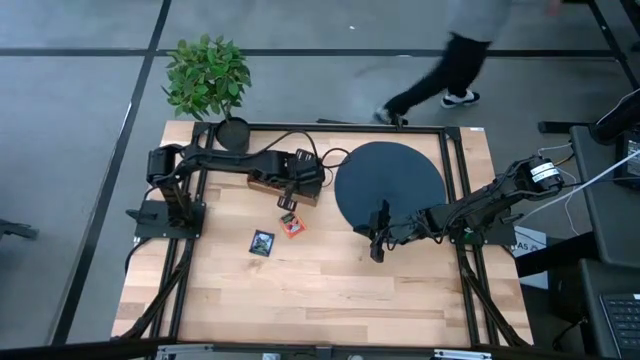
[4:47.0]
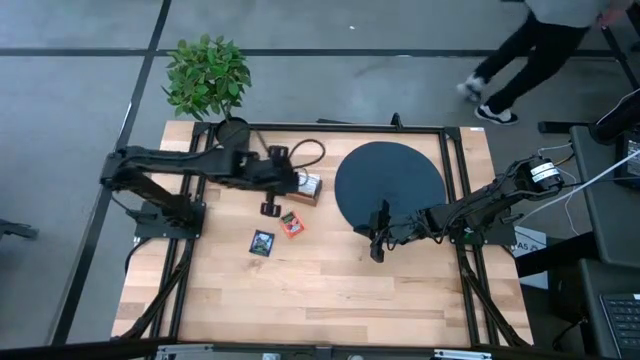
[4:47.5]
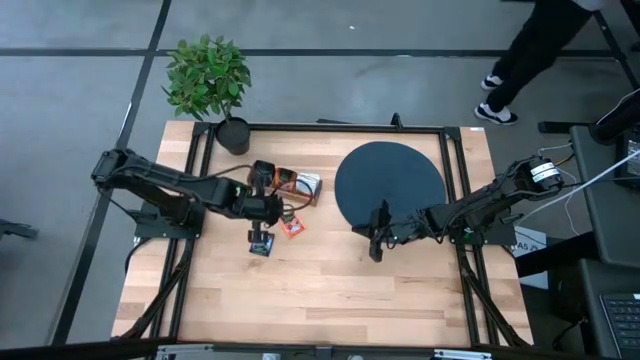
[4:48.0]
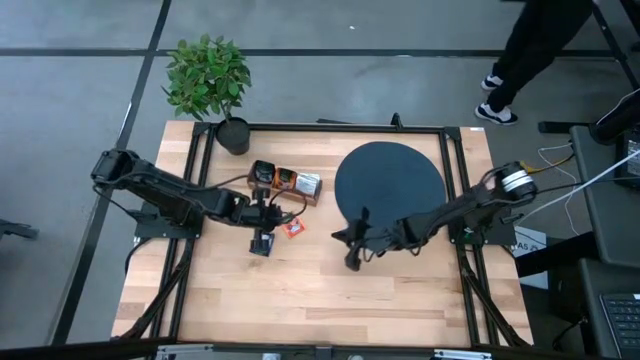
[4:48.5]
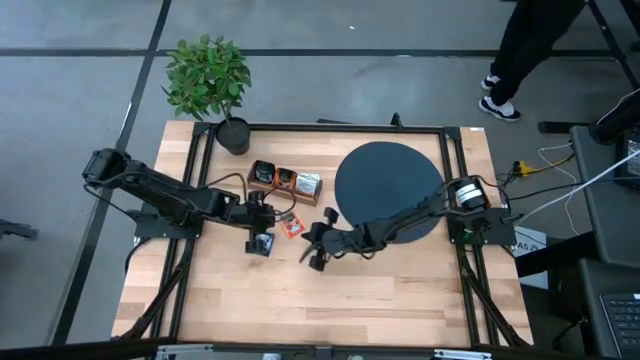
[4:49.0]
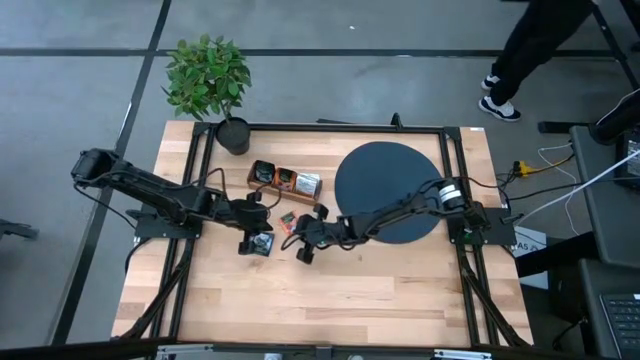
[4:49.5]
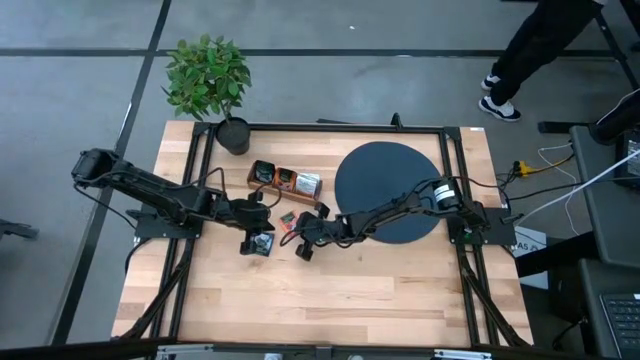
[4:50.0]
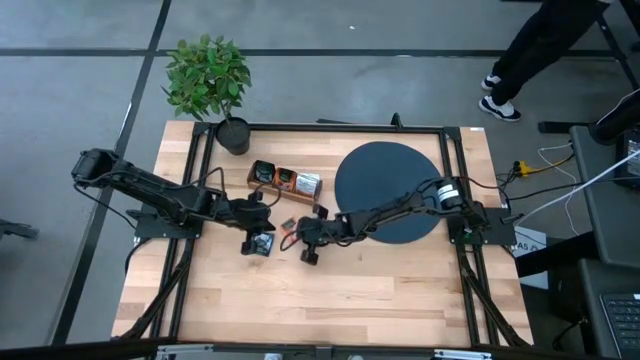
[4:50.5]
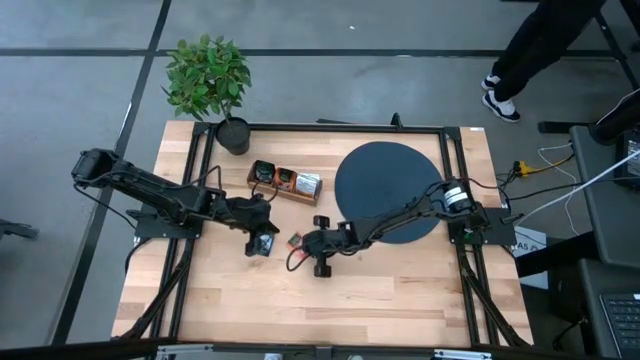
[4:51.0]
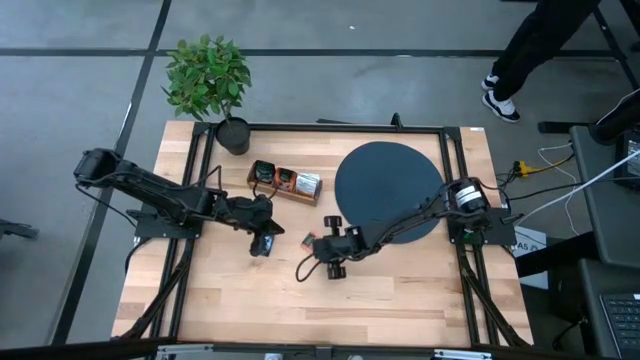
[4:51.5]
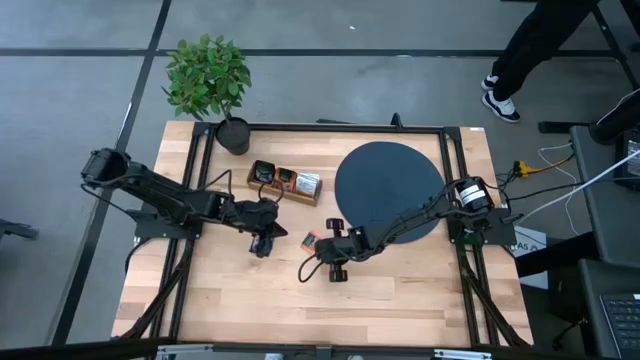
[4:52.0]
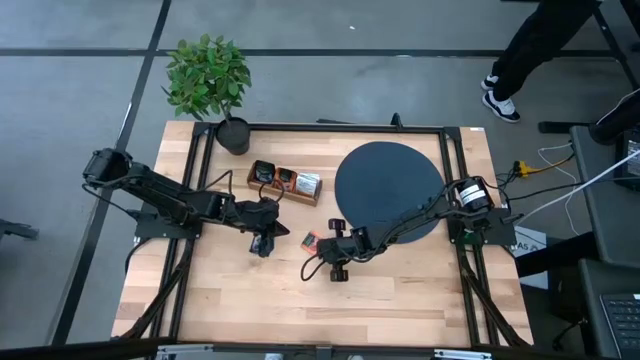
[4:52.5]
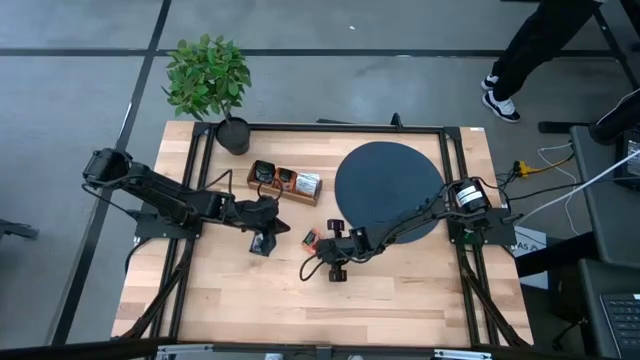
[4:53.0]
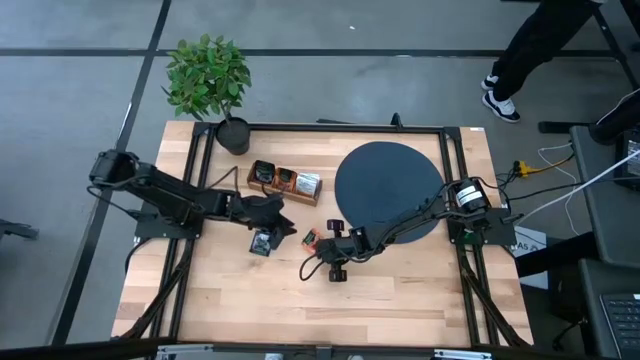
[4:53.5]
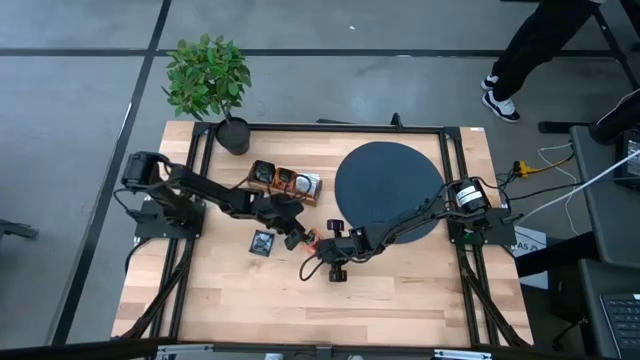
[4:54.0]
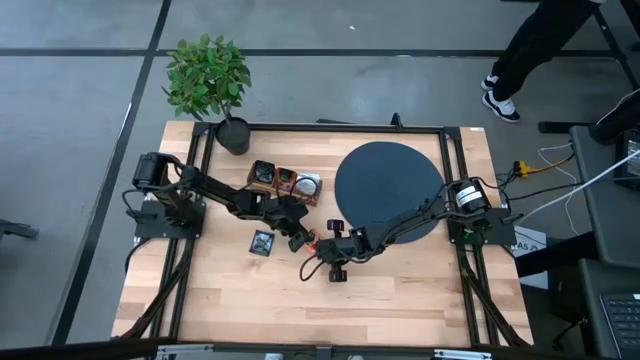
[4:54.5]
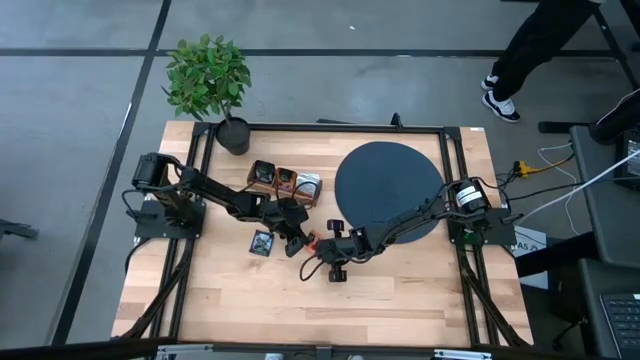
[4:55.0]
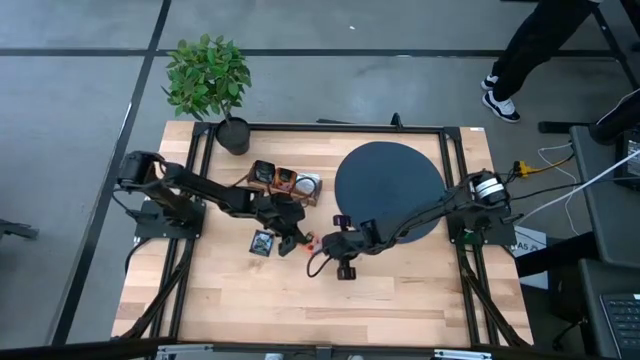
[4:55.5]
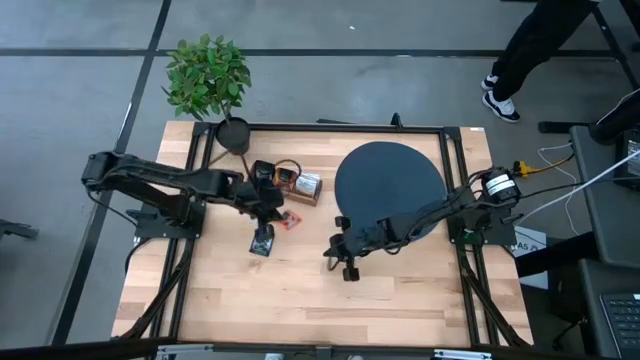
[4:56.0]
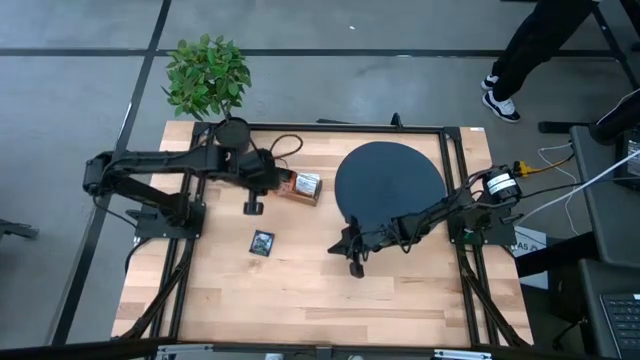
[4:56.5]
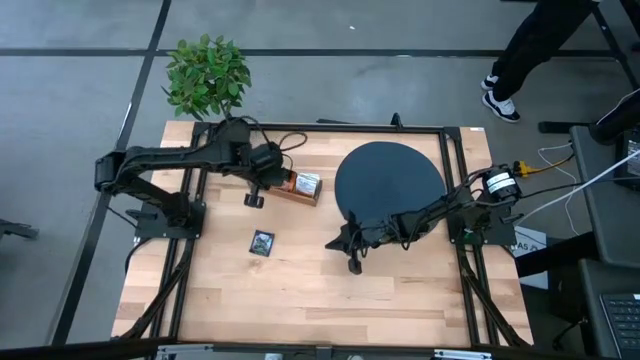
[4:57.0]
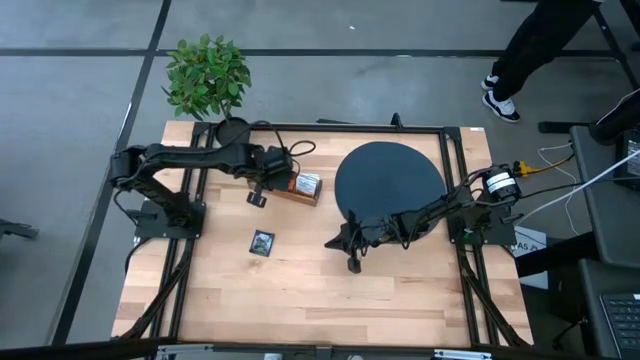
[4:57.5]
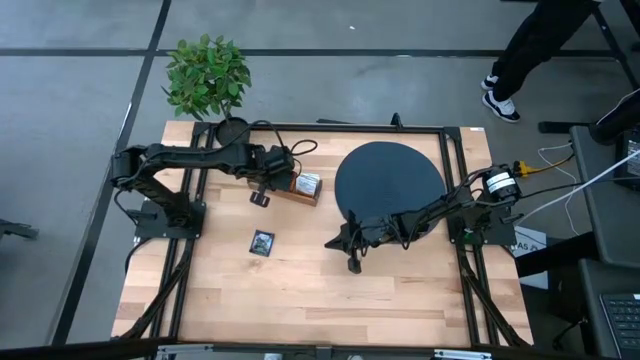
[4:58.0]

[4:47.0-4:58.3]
Task: Pick & Place Tea
Put the orange tea bag into the middle section of the wooden organizer

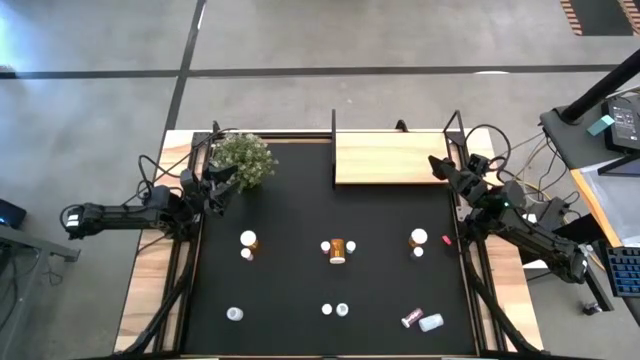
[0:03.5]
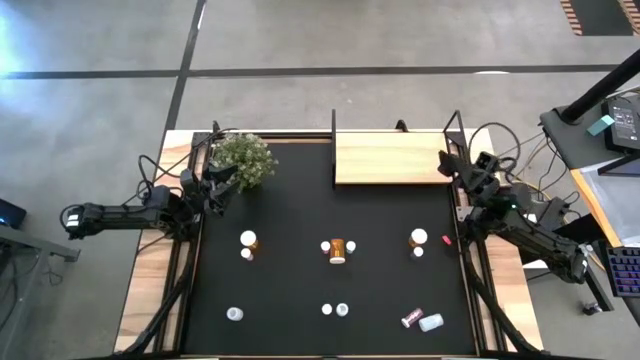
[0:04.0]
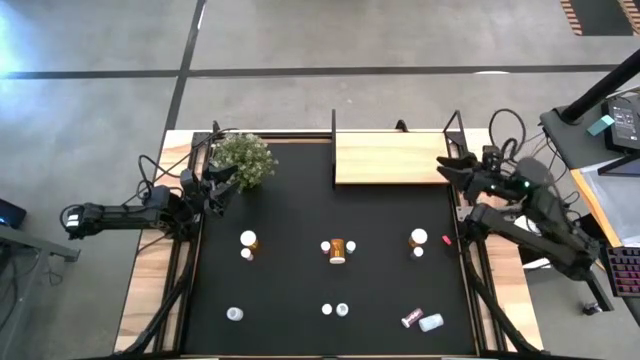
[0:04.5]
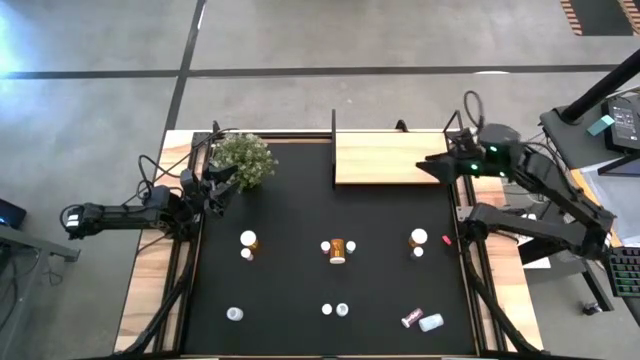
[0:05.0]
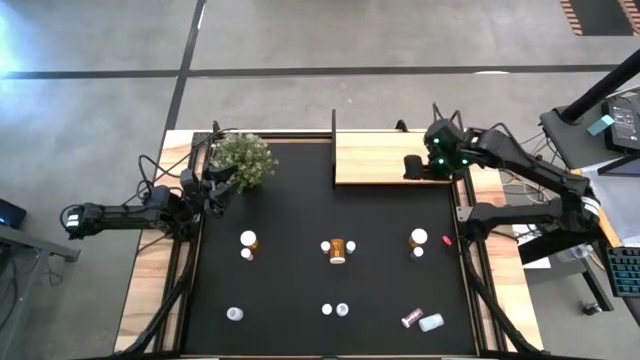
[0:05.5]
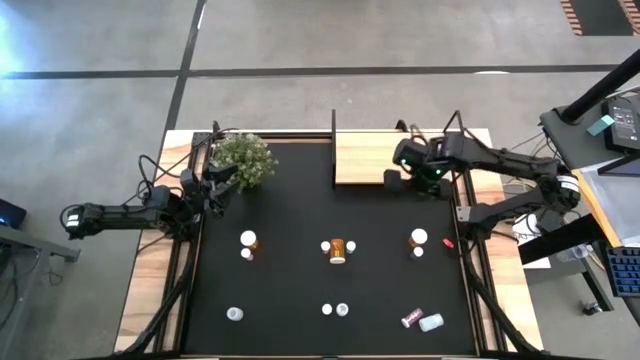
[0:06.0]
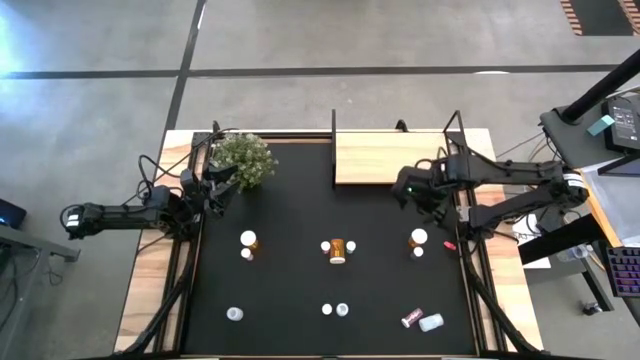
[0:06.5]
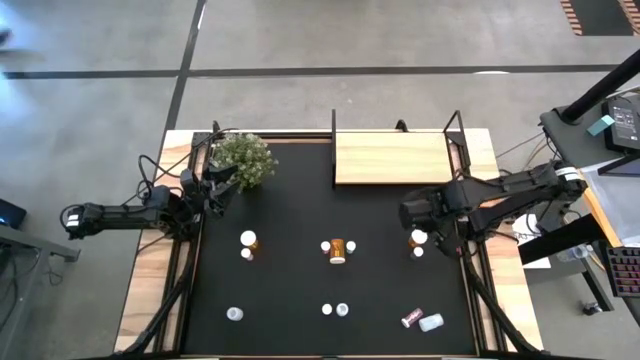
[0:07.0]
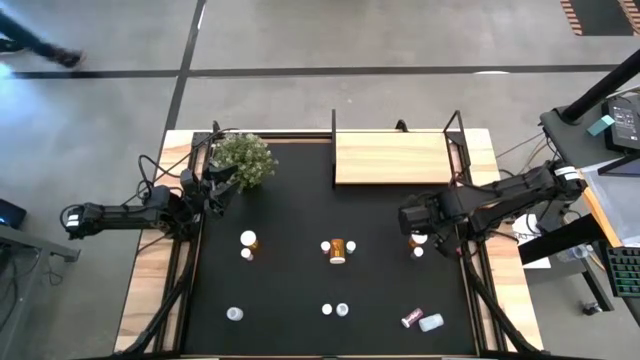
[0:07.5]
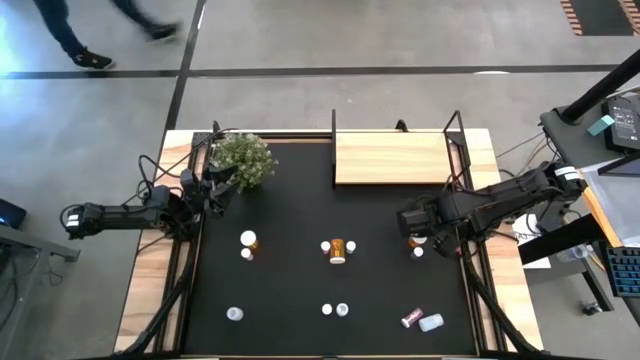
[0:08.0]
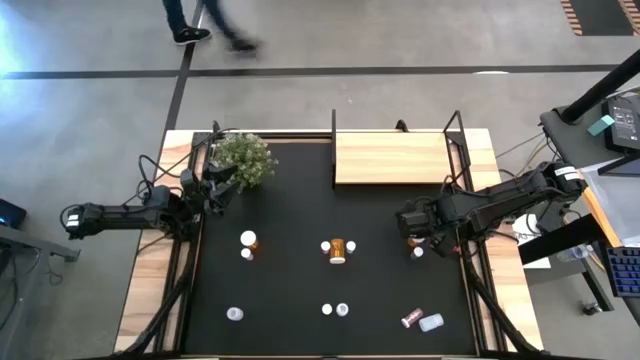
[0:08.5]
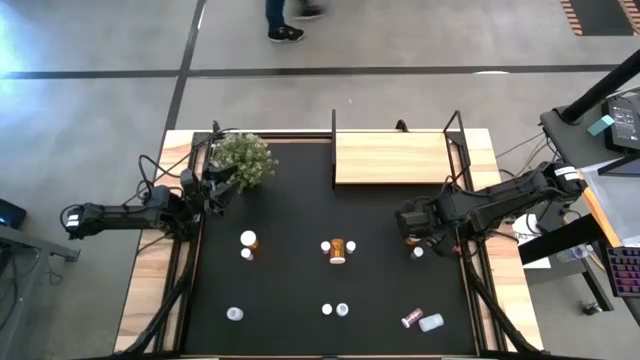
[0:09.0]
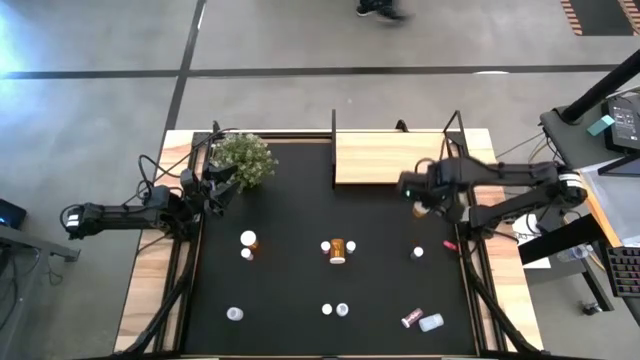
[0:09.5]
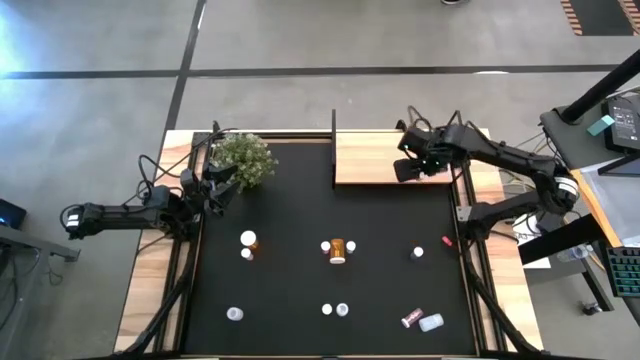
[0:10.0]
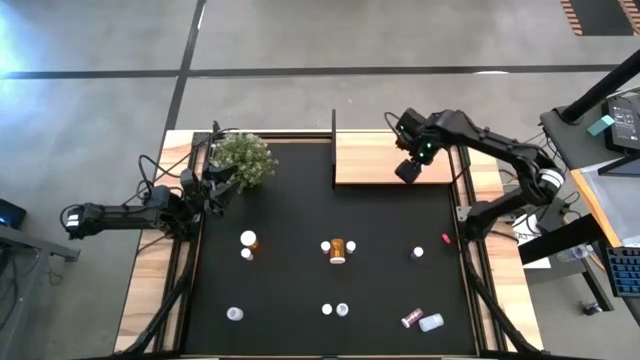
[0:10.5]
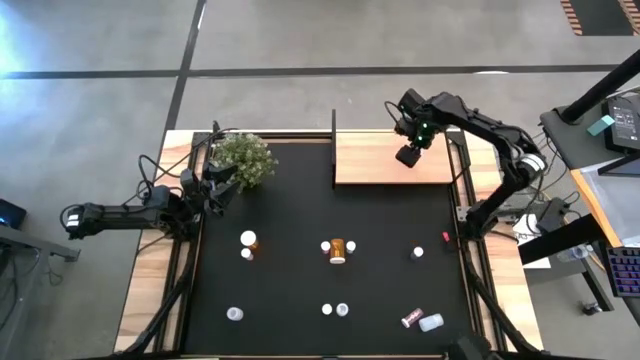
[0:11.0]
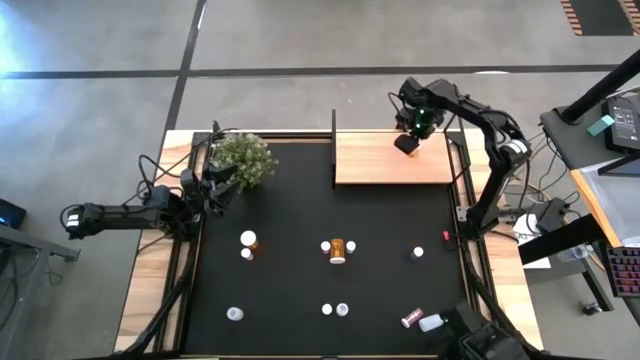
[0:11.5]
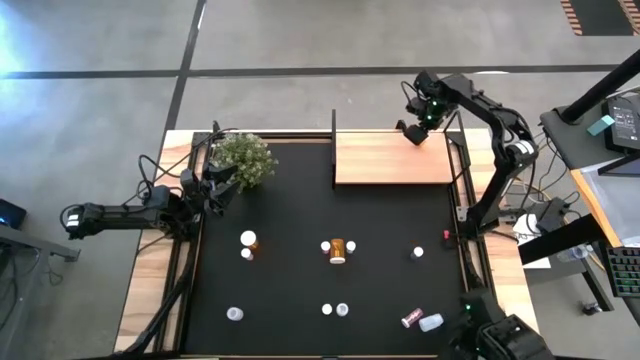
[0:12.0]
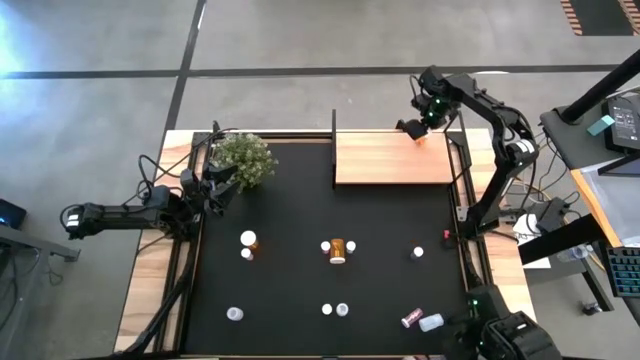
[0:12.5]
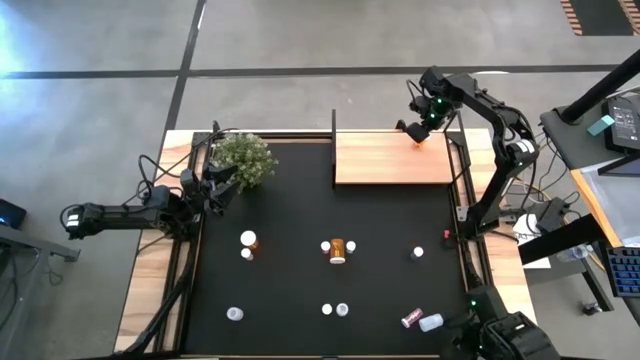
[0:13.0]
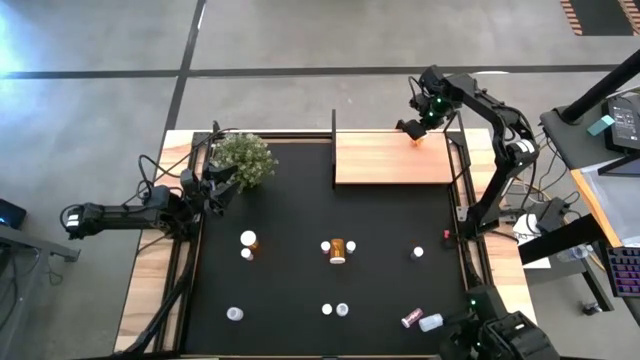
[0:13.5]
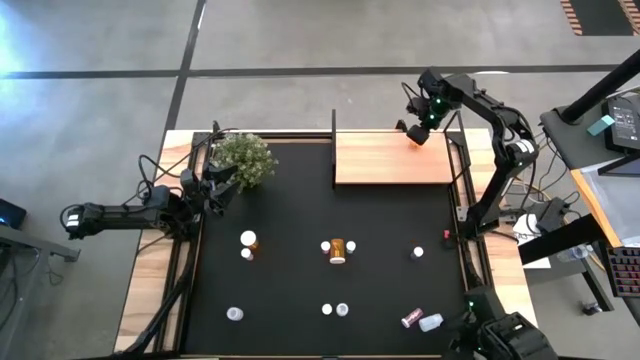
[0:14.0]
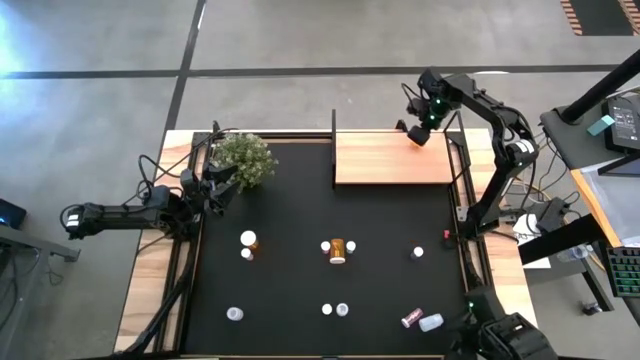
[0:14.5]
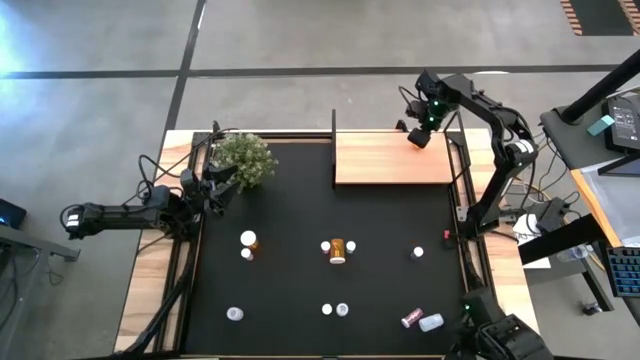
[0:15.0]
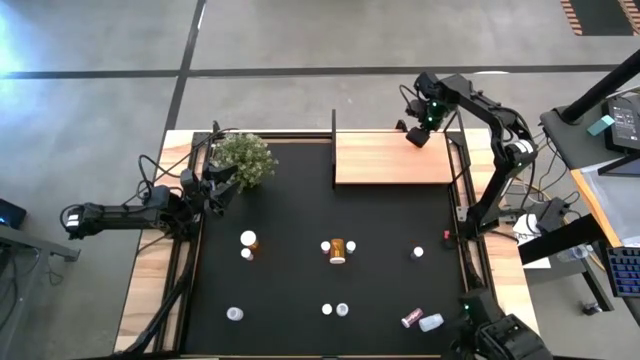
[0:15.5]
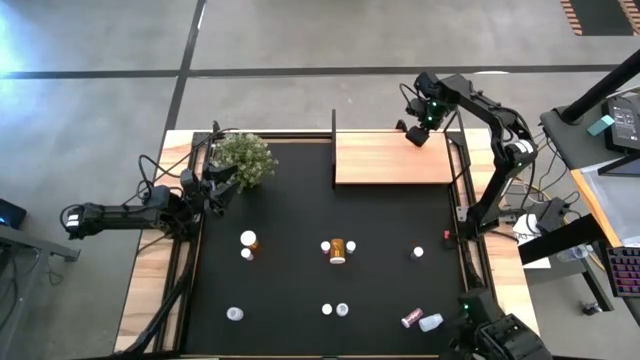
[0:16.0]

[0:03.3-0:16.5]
Task: Pick and place medicine bottles onto shelf by color
Put the right orange pill bottle on the shelf
